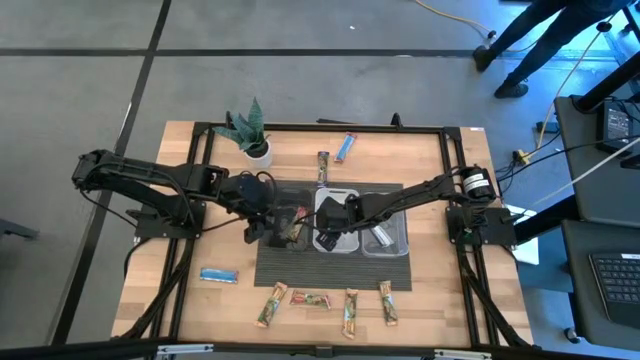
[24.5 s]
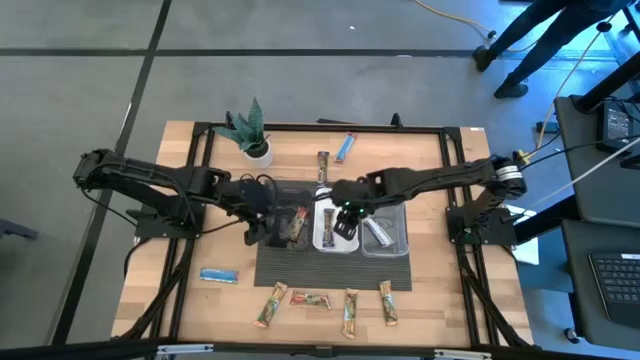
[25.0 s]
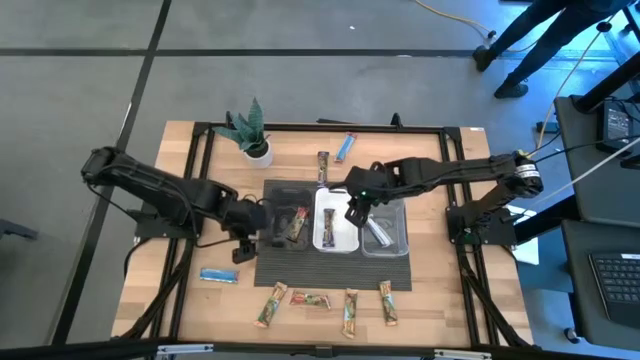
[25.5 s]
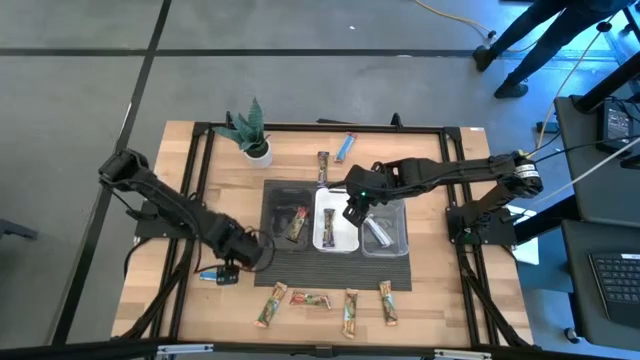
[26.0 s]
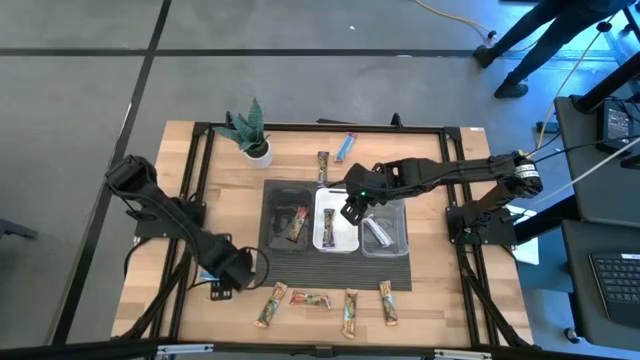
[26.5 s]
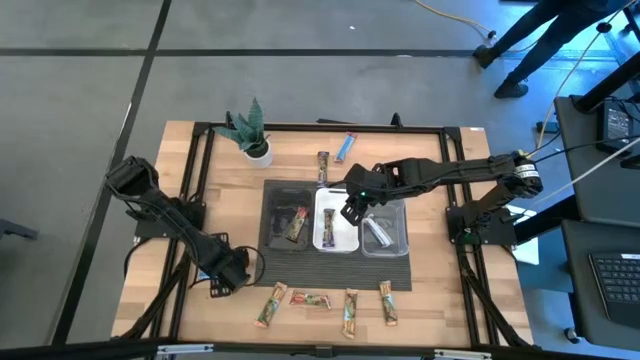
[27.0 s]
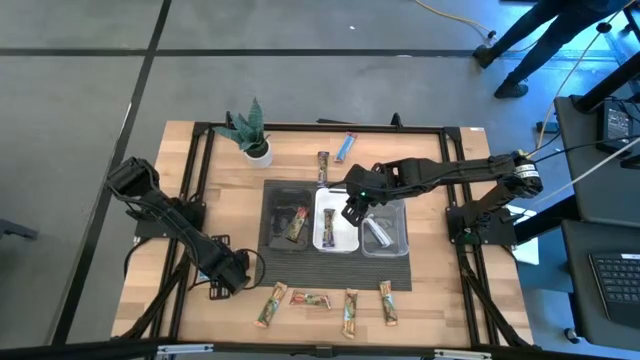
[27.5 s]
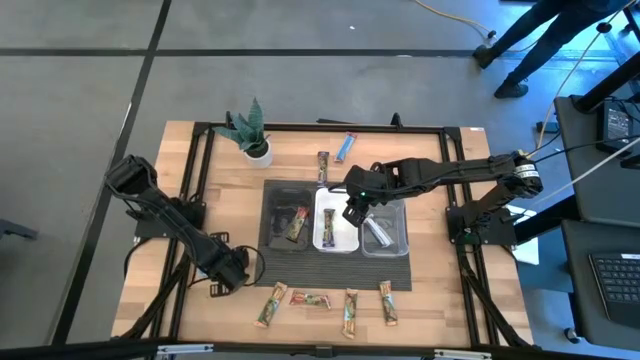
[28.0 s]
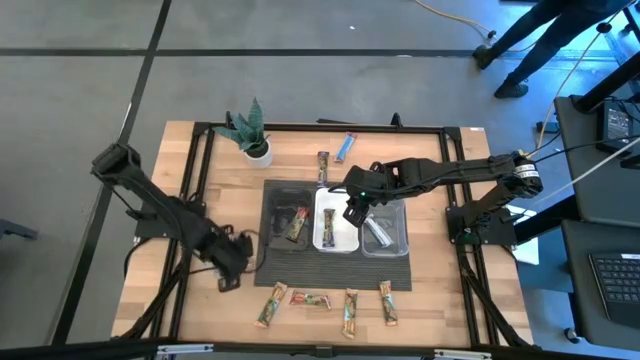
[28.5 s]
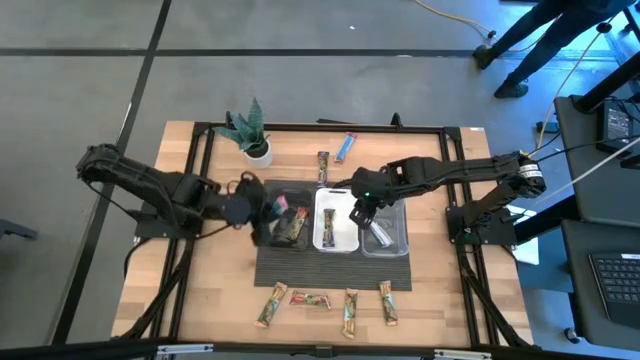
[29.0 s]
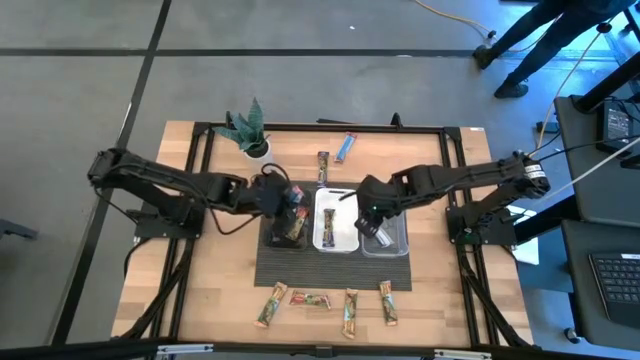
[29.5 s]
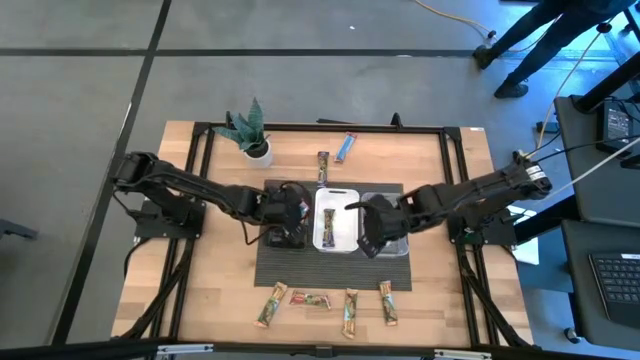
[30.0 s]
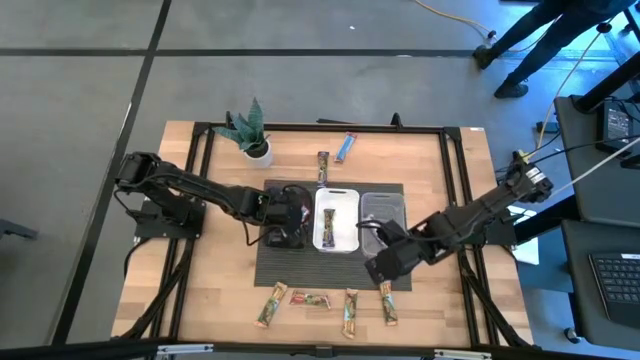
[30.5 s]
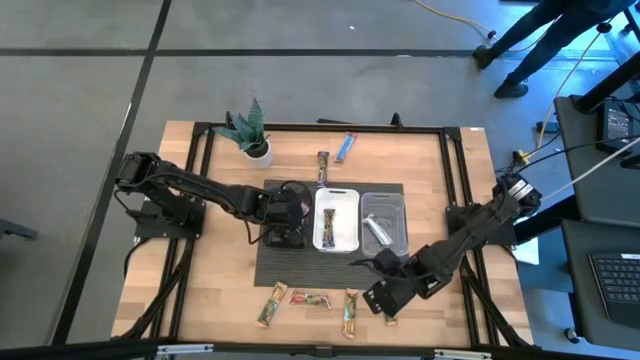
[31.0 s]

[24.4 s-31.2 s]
Task: Pick and place Granola Bars by type
Put the red granola bar into the black bin

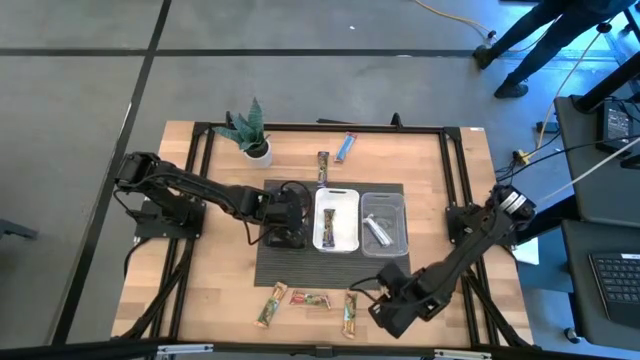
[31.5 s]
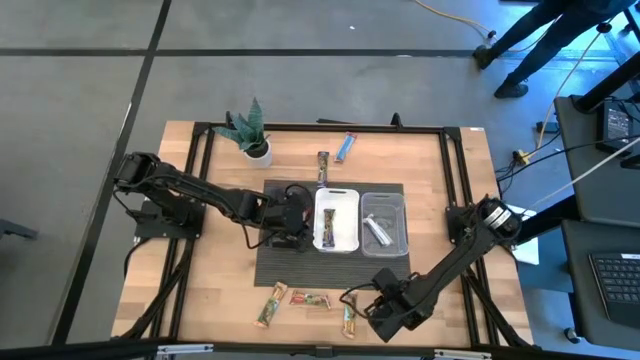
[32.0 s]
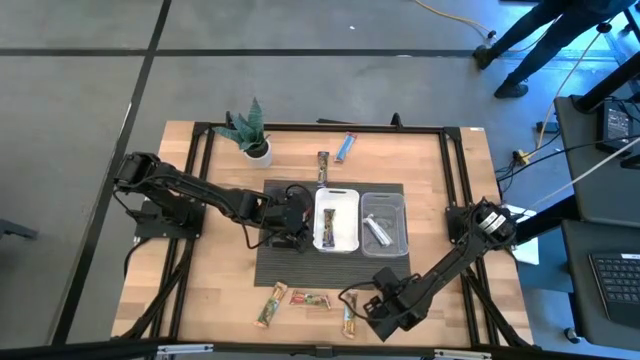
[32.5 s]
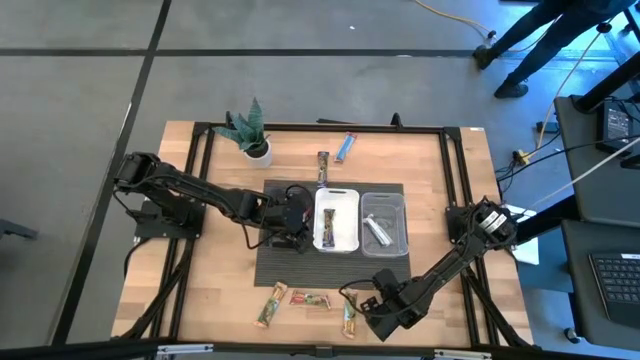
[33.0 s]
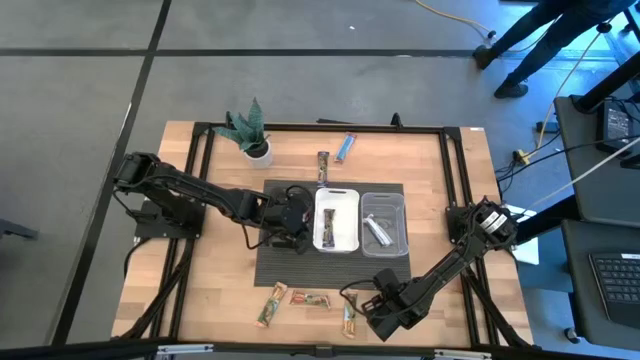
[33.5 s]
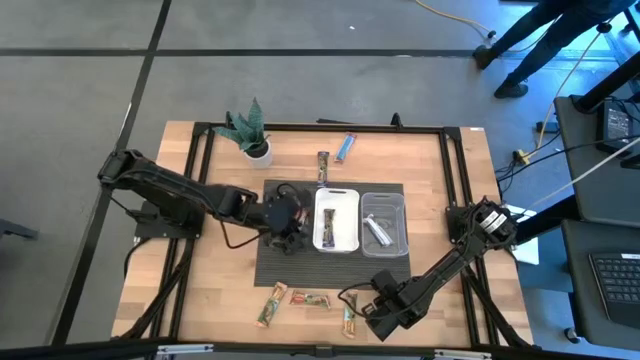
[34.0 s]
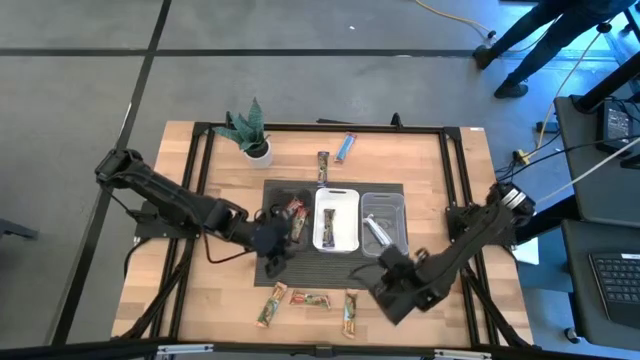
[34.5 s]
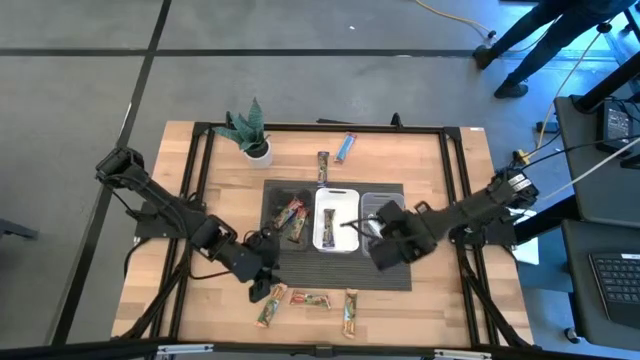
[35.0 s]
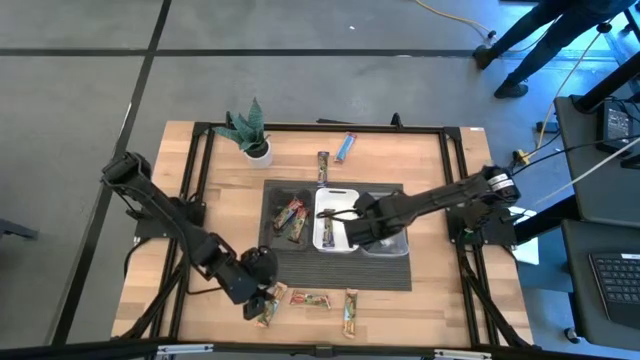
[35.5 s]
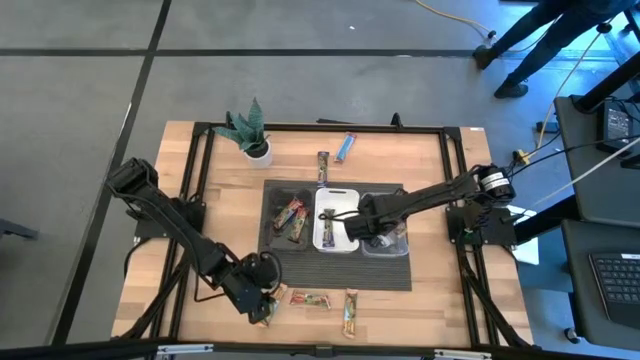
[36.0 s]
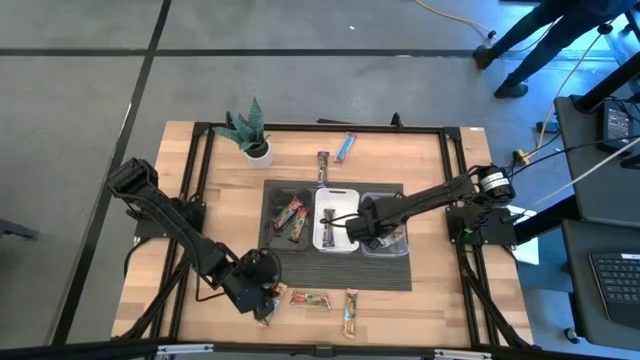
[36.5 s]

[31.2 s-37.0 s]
Put the yellow granola bar into the transparent bin

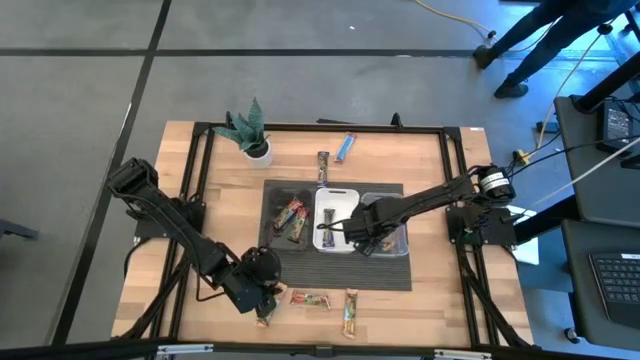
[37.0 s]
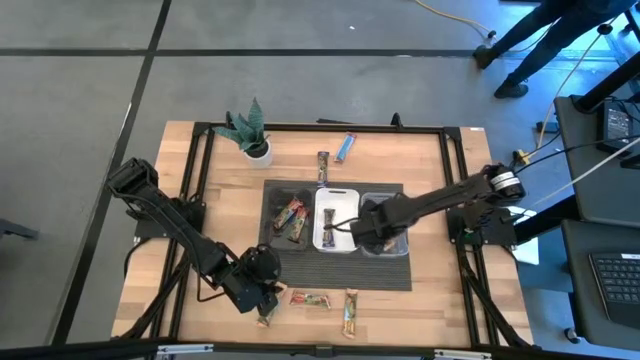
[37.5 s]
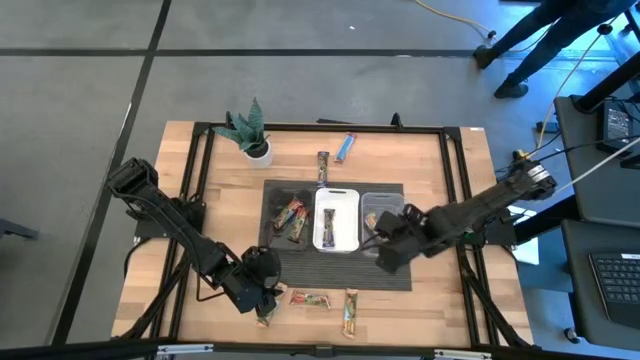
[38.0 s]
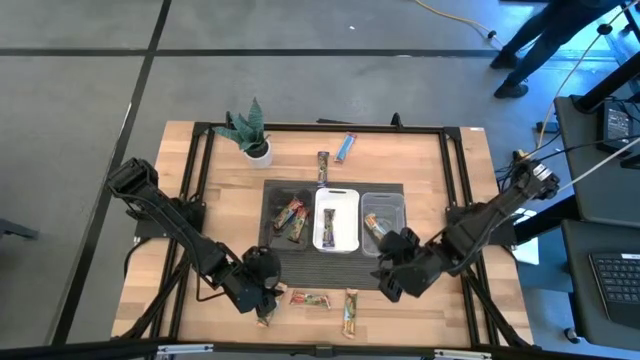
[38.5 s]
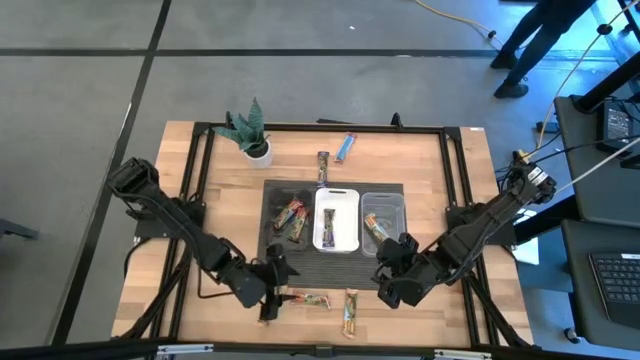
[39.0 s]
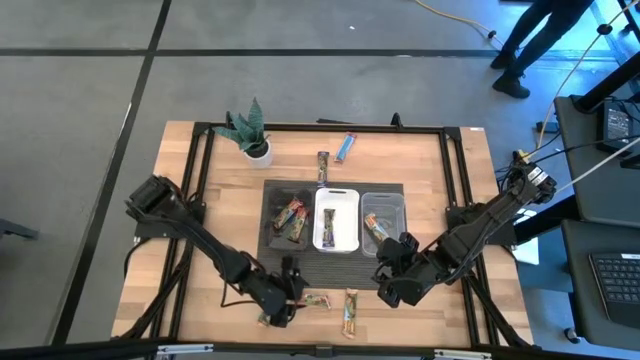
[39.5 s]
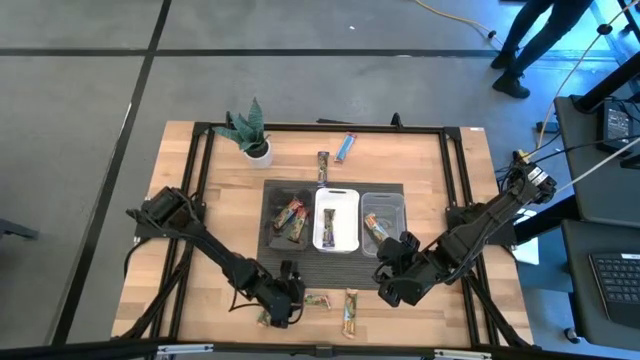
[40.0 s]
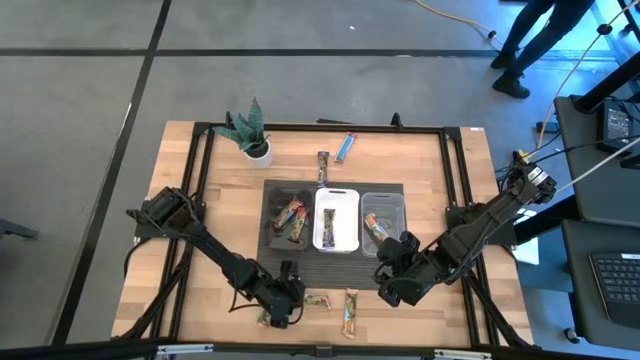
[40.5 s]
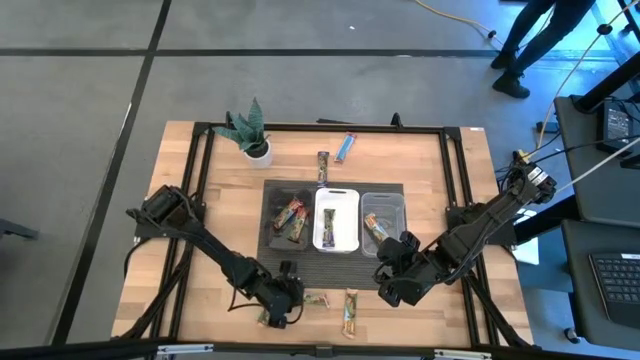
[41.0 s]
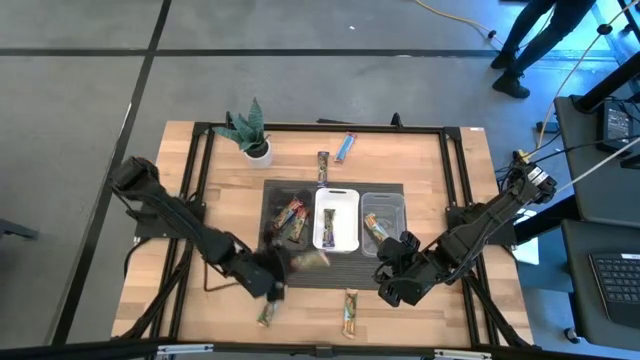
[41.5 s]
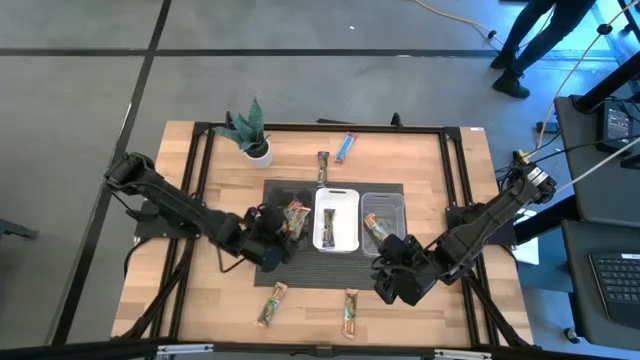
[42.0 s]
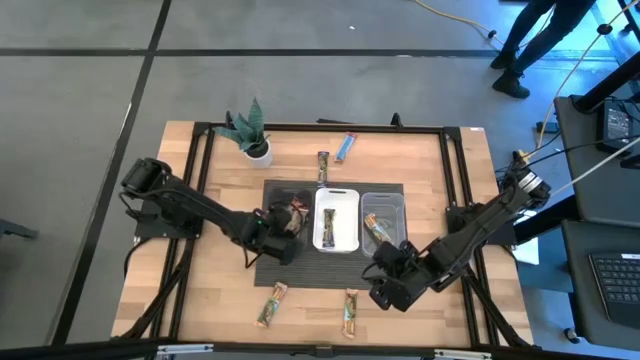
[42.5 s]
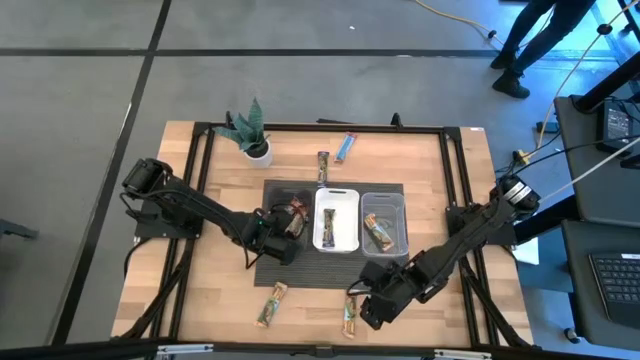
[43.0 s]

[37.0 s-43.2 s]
Put the red granola bar into the black bin

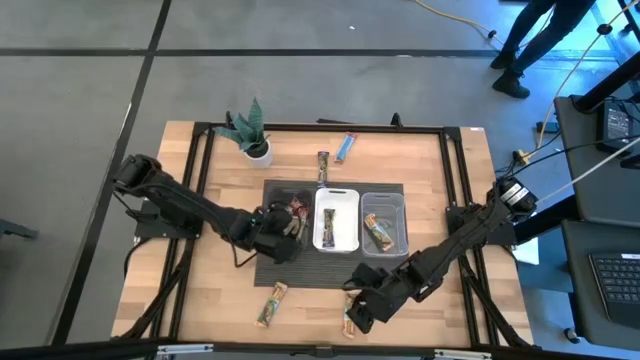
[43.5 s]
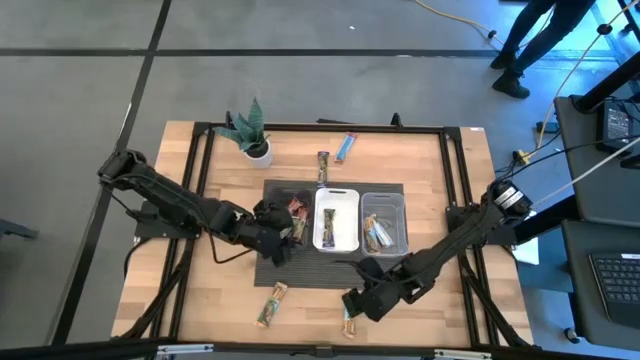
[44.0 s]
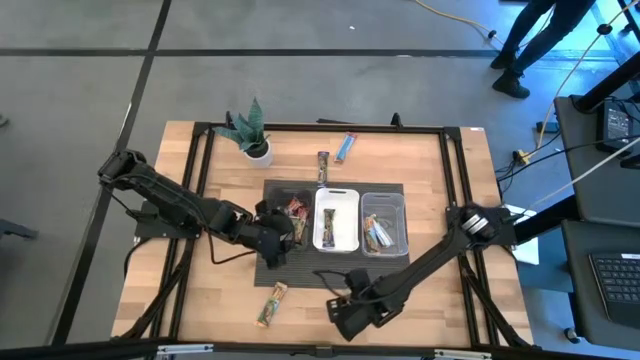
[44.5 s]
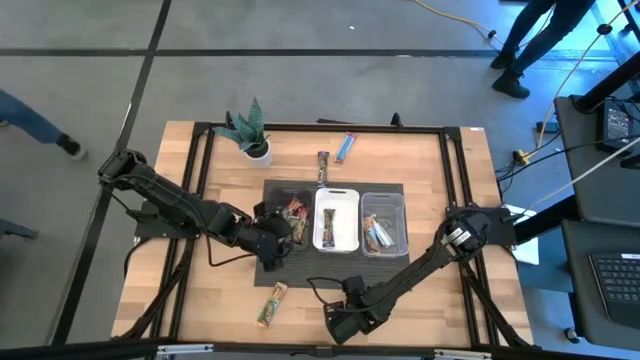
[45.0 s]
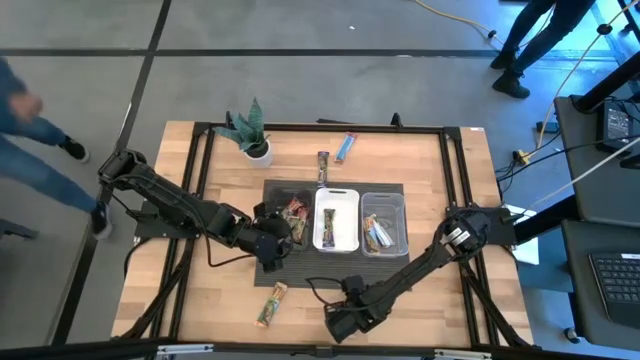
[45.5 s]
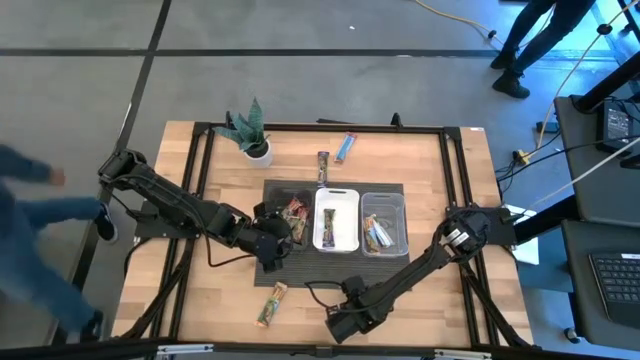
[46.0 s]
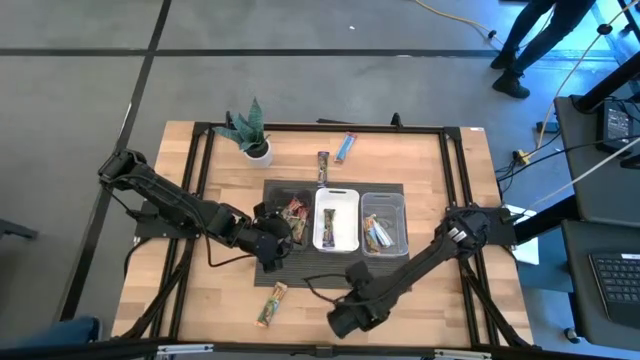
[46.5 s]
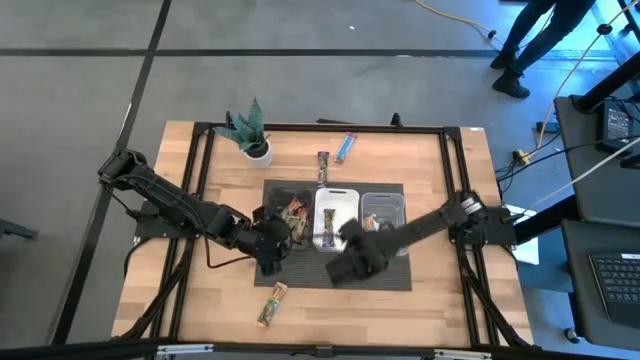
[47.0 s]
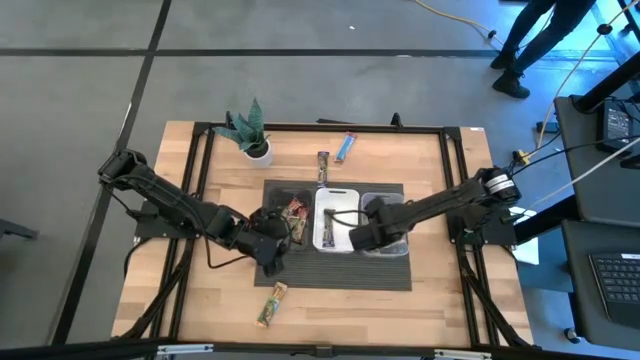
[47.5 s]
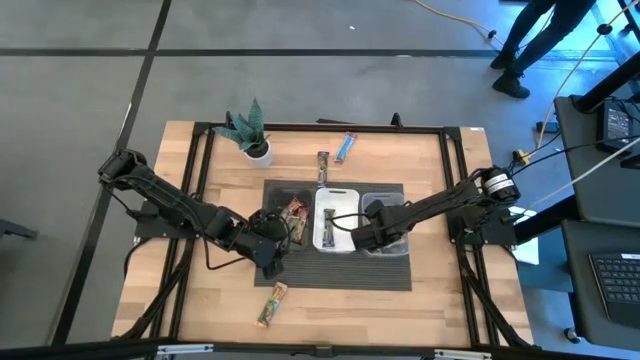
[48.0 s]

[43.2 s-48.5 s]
Put the yellow granola bar into the transparent bin
